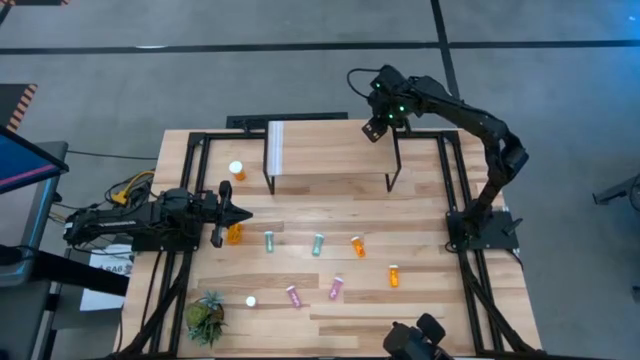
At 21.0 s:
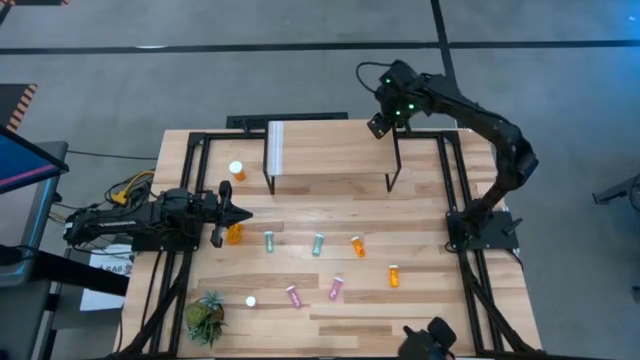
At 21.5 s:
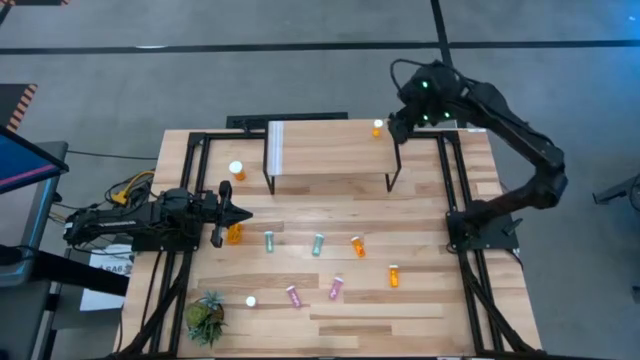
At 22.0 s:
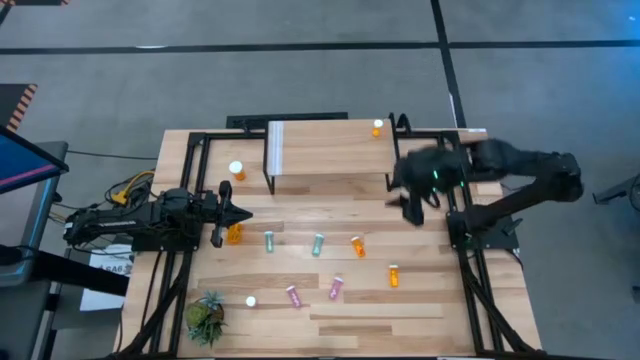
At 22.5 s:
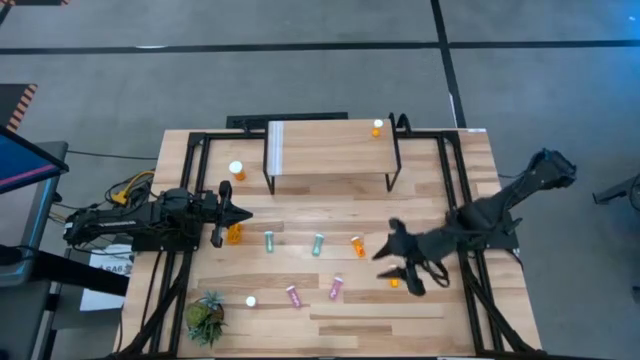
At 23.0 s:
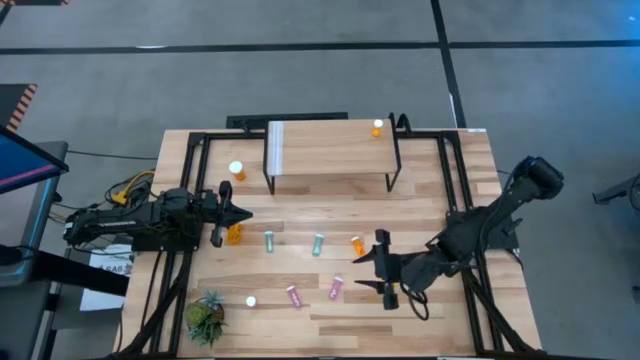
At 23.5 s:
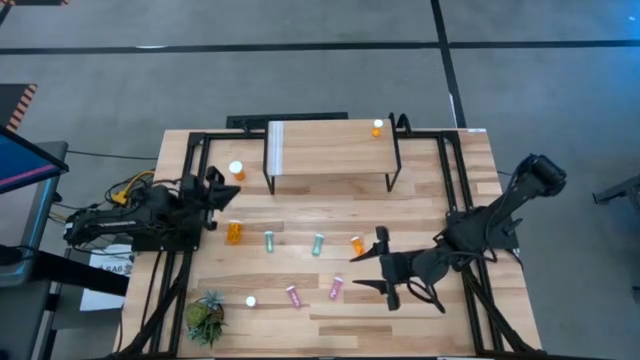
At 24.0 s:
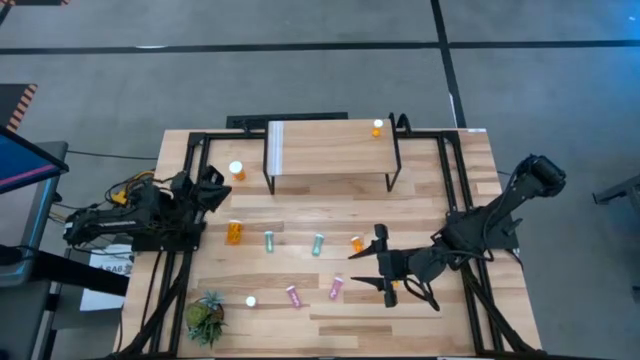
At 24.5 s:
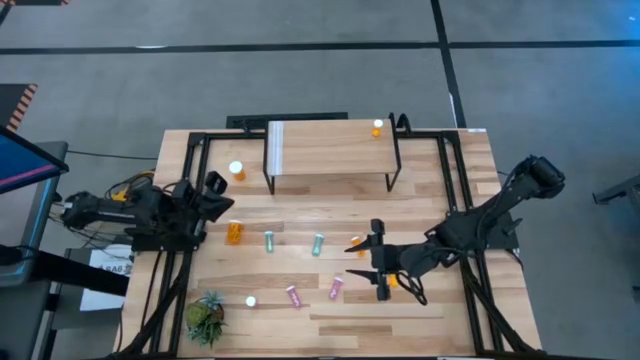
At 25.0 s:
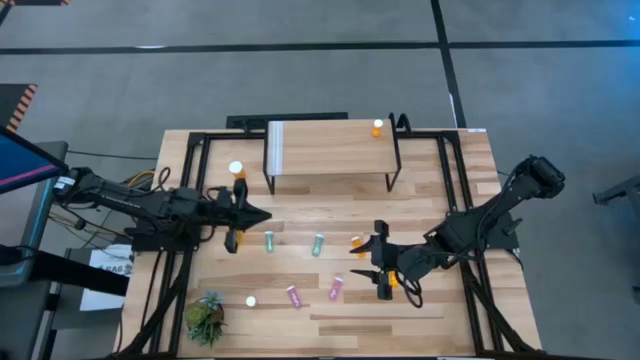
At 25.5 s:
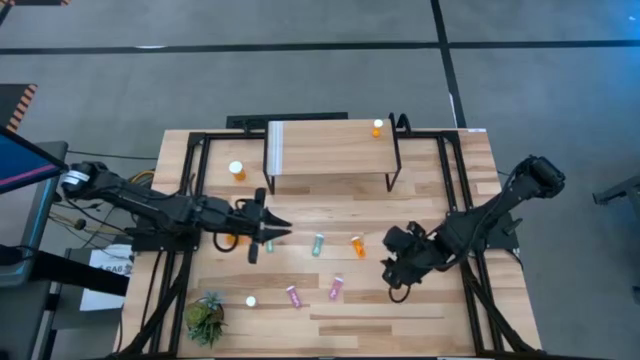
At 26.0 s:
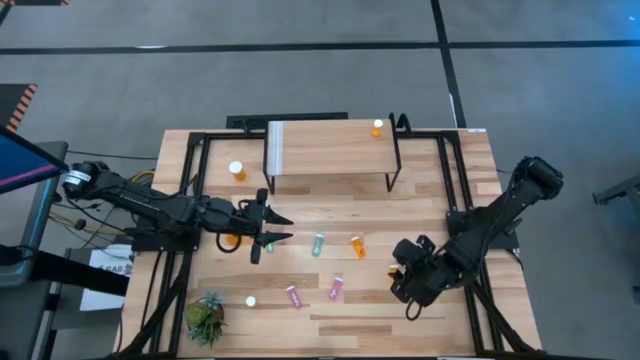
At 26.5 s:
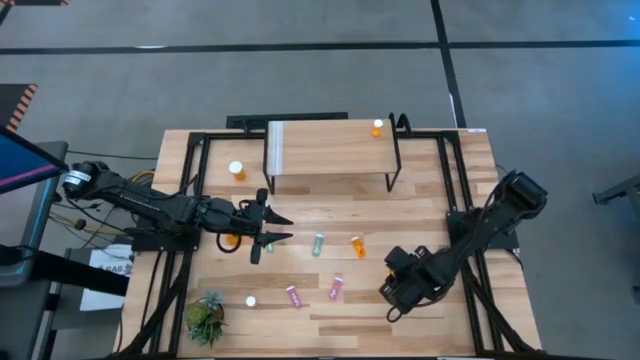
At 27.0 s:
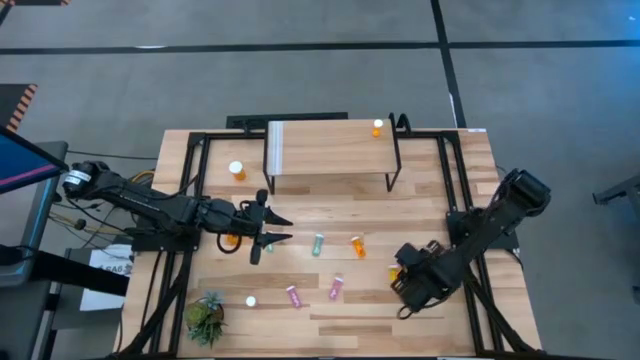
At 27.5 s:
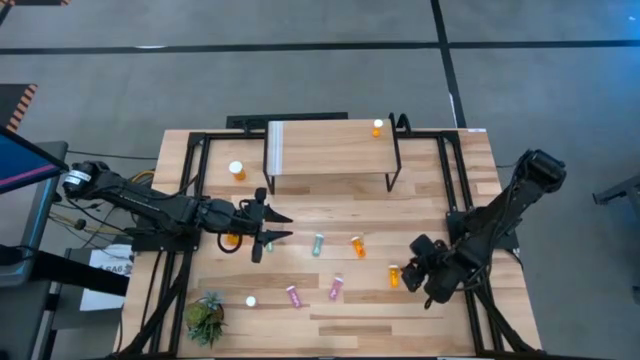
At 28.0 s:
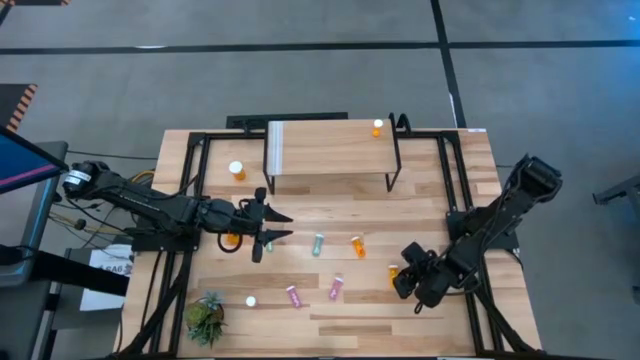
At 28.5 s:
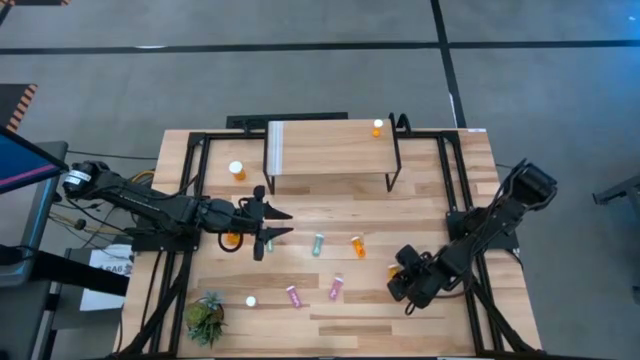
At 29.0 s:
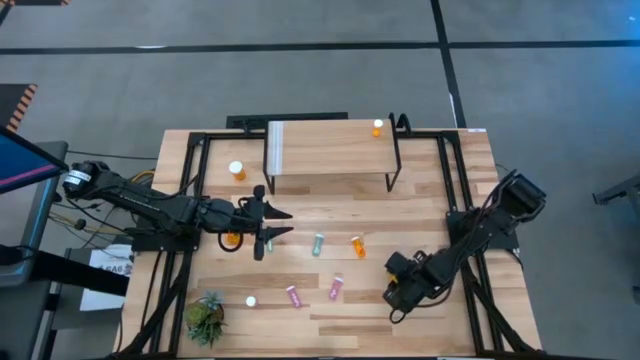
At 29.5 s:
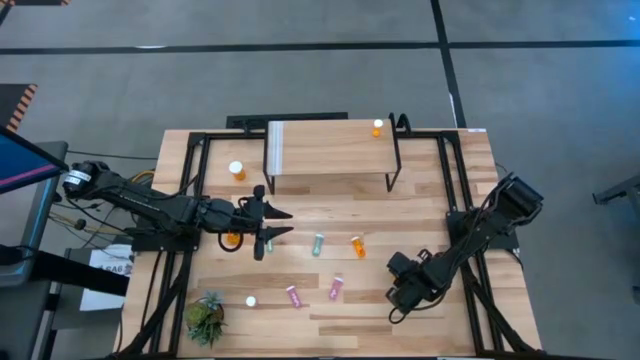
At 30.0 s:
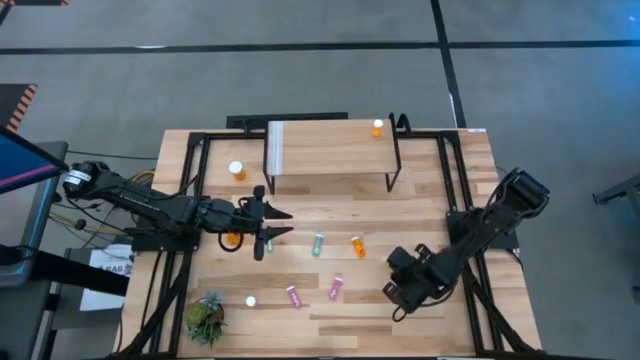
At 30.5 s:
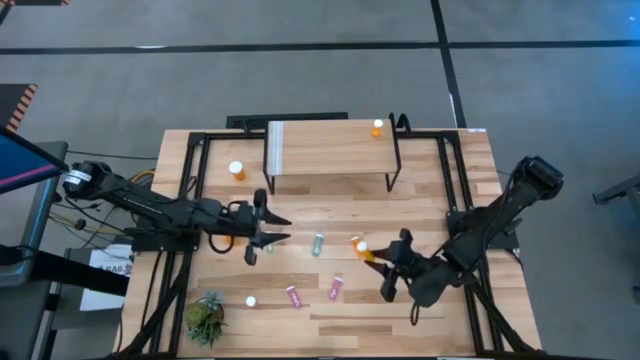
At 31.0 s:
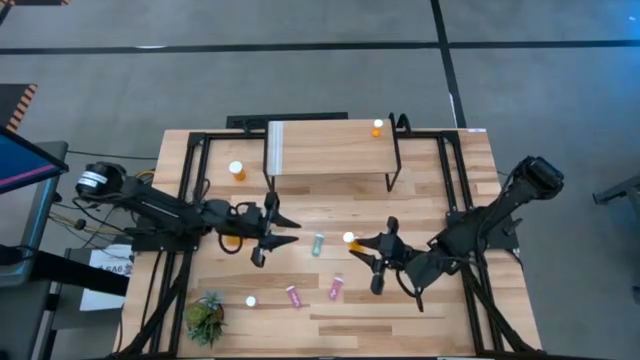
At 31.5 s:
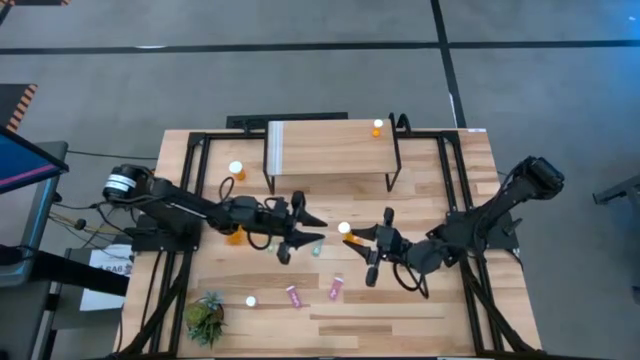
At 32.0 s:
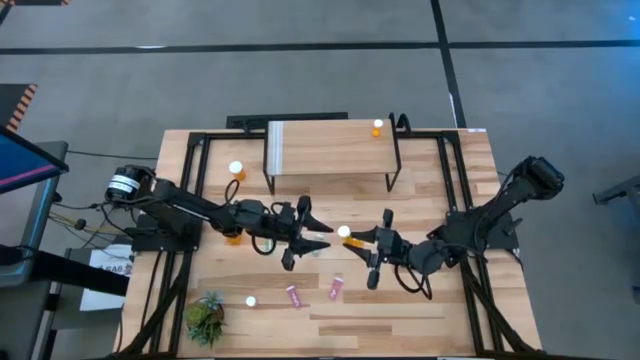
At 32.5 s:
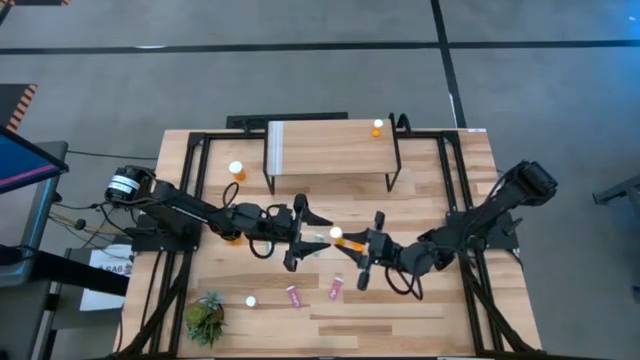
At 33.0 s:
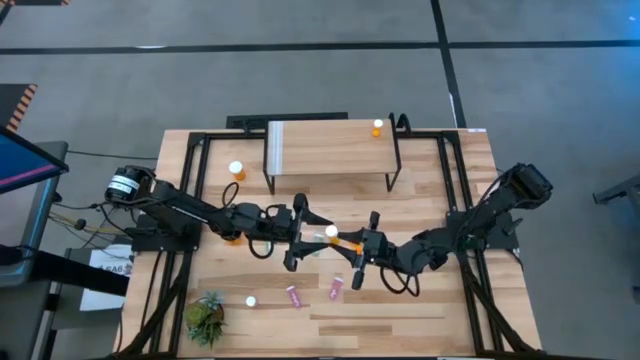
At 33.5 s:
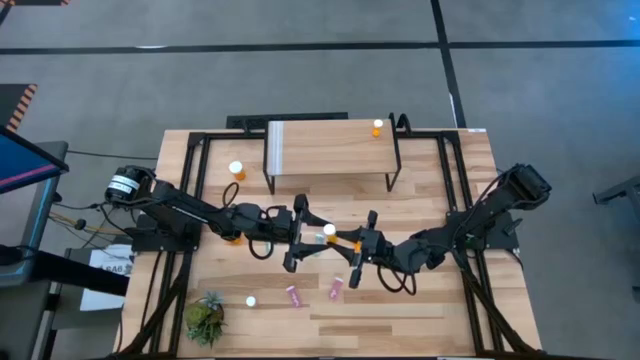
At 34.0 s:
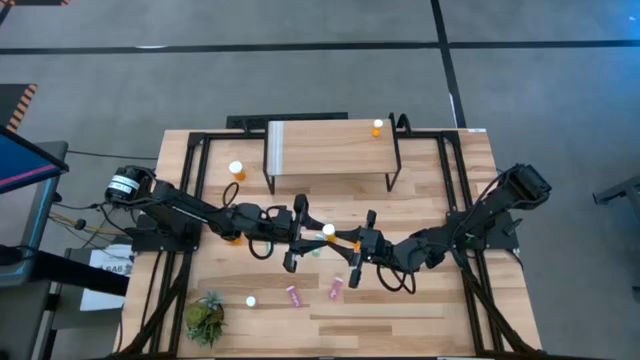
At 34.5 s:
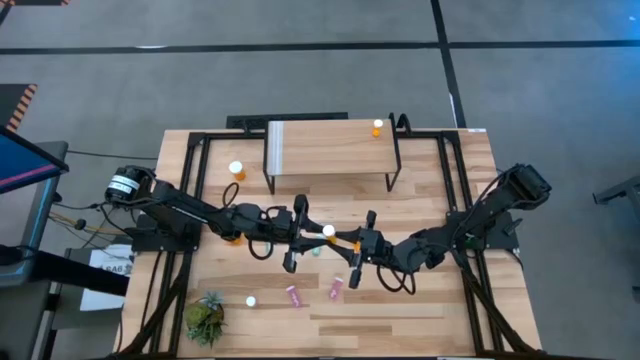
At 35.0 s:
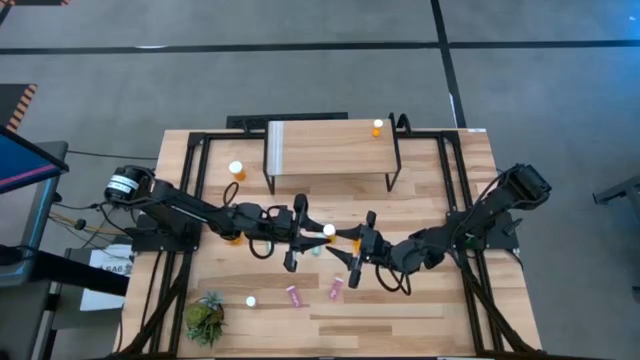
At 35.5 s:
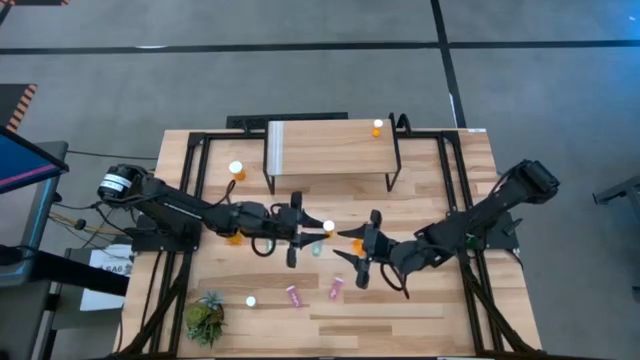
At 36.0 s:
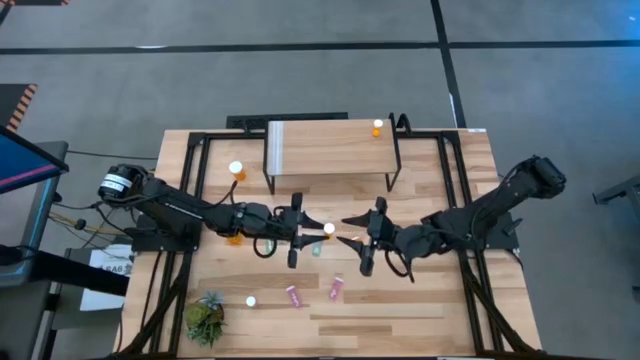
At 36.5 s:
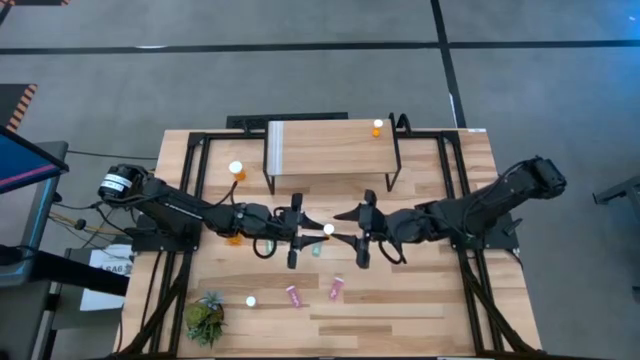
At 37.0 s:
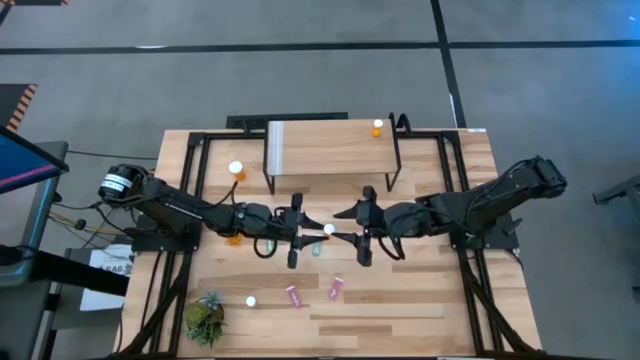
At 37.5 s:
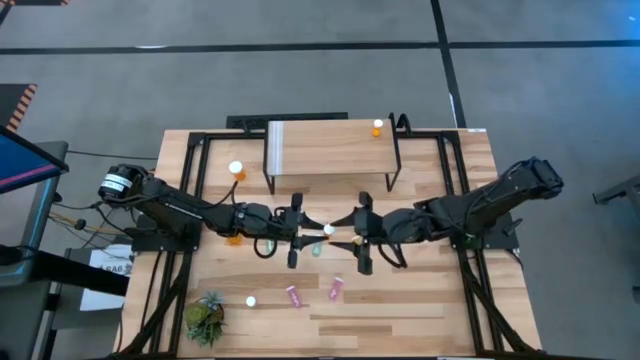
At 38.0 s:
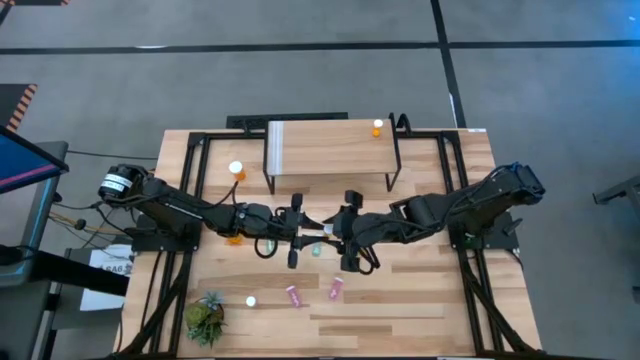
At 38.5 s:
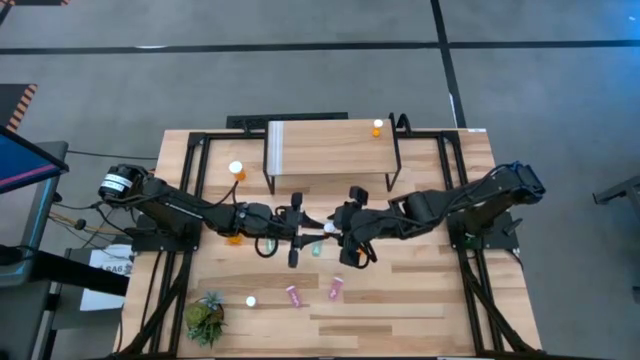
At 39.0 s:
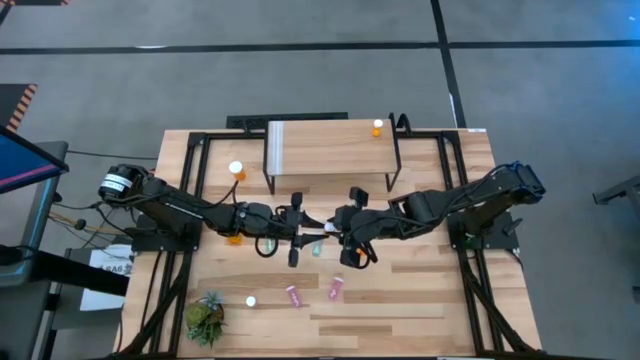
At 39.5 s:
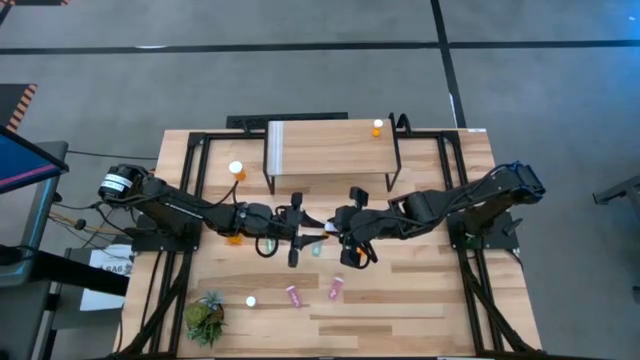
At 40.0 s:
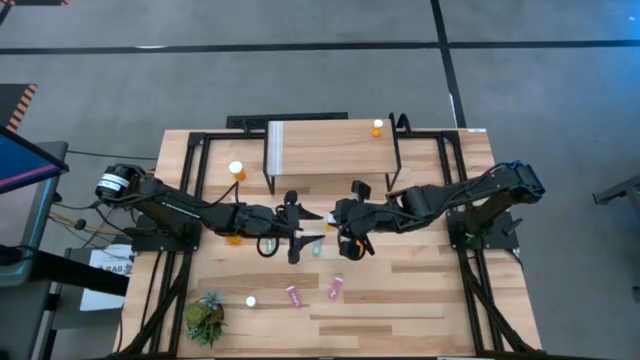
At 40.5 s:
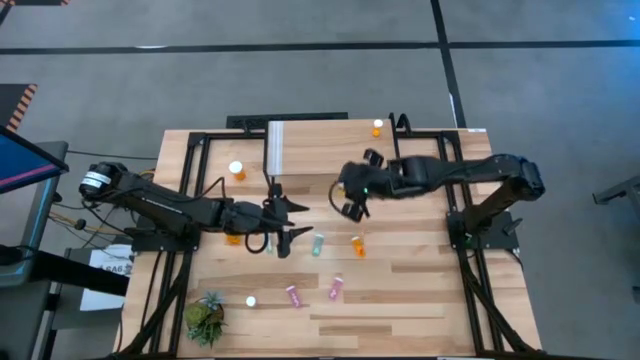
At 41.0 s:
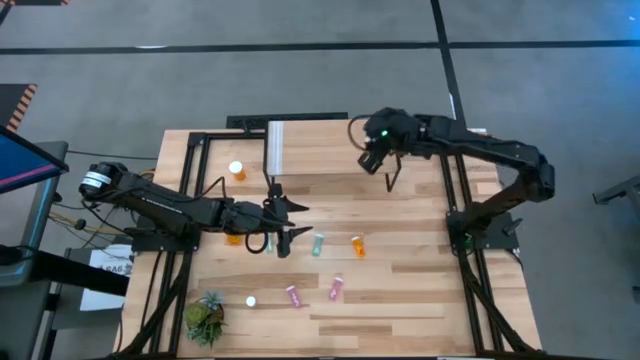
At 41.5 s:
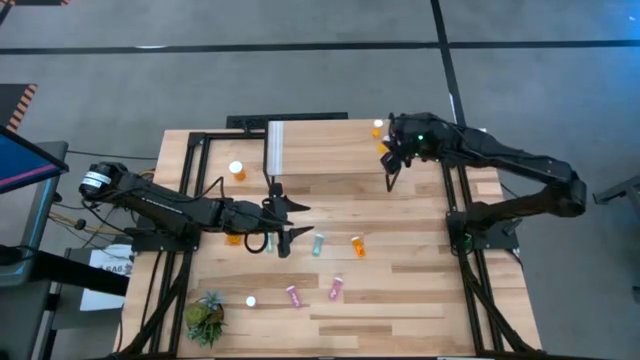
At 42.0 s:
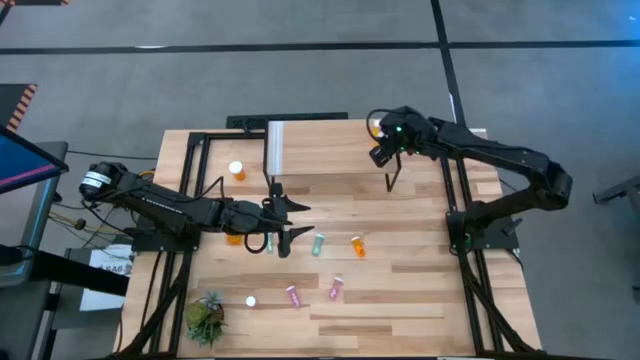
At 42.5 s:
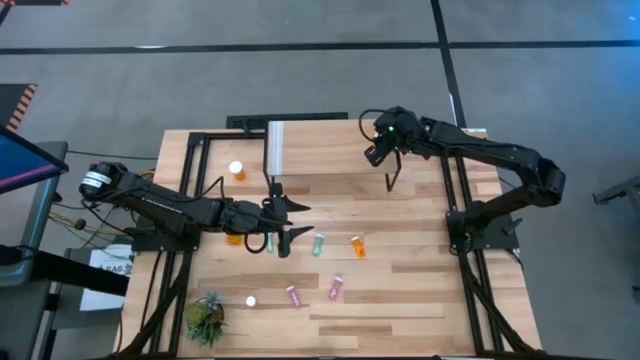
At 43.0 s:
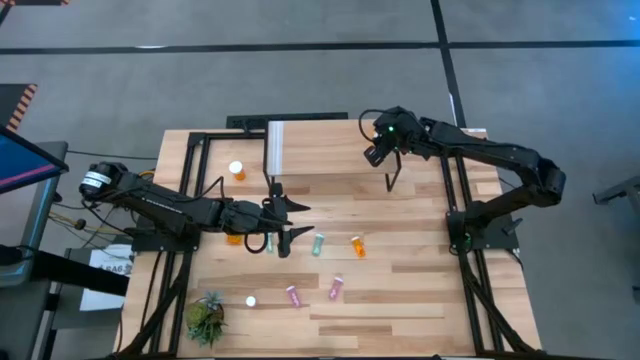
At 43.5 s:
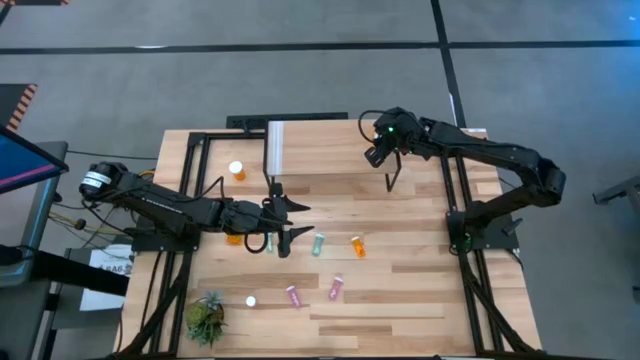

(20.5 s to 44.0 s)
Task: Pick and place medicine bottles onto shelf by color
Put the bottom small orange pill bottle on the shelf aligned with the other small orange pill bottle
